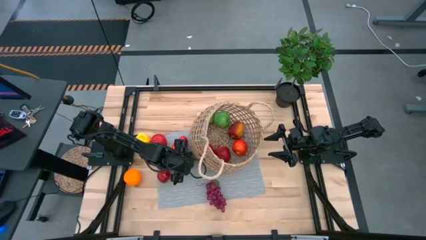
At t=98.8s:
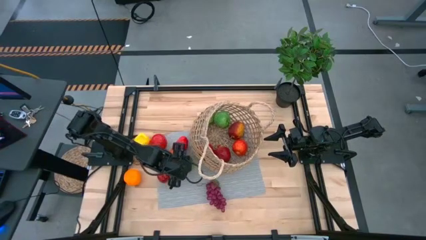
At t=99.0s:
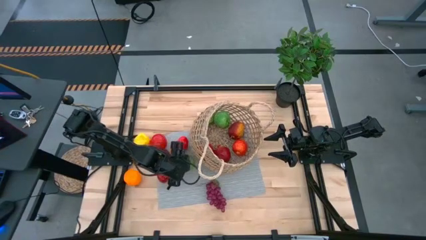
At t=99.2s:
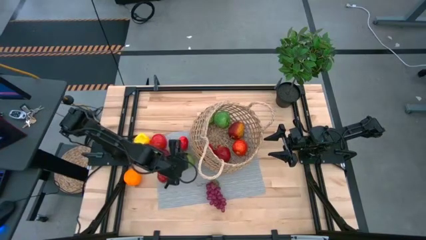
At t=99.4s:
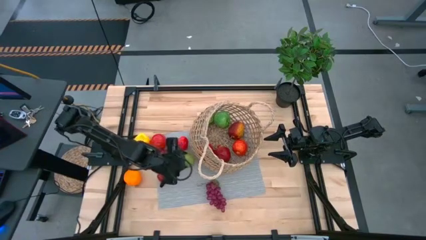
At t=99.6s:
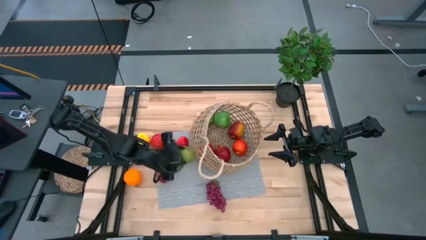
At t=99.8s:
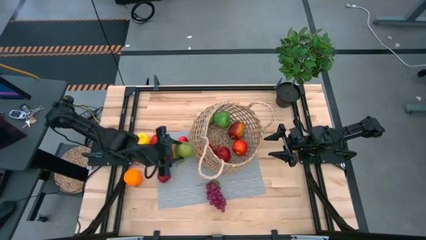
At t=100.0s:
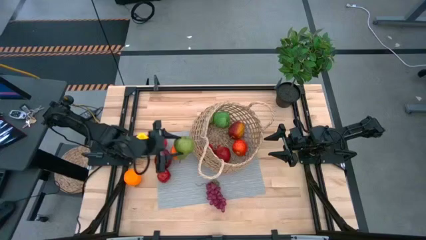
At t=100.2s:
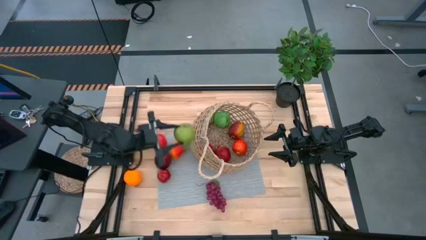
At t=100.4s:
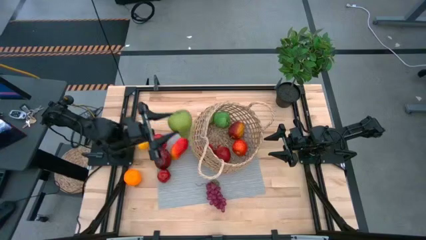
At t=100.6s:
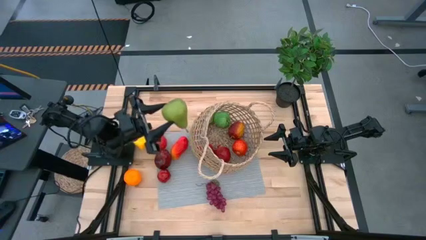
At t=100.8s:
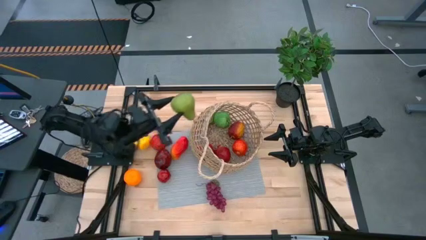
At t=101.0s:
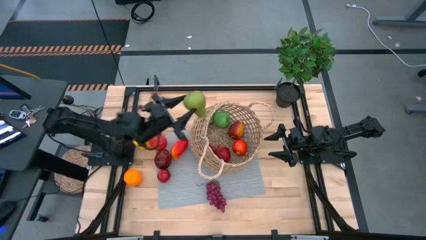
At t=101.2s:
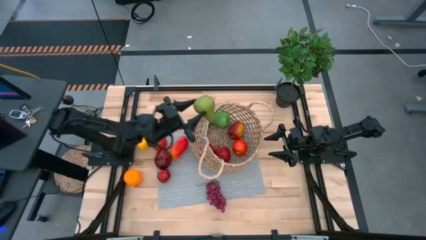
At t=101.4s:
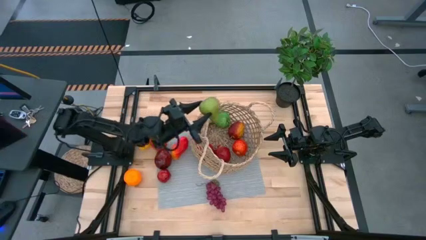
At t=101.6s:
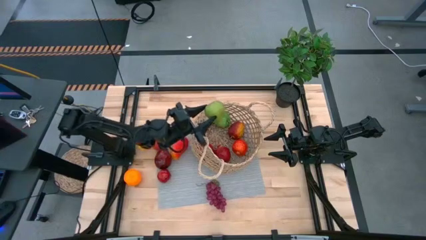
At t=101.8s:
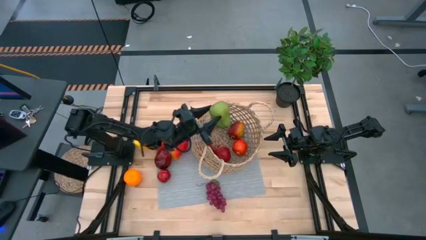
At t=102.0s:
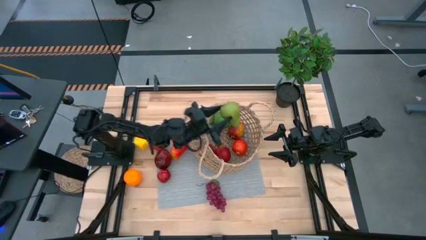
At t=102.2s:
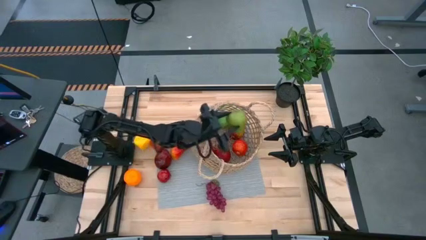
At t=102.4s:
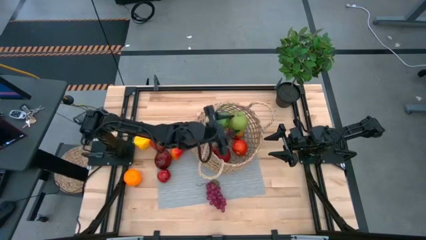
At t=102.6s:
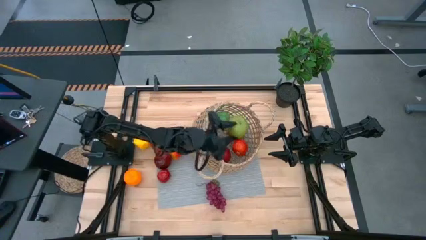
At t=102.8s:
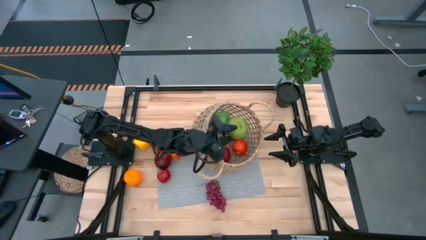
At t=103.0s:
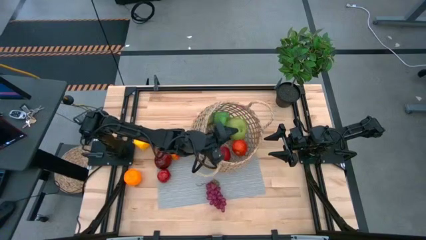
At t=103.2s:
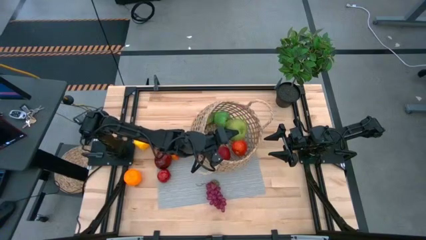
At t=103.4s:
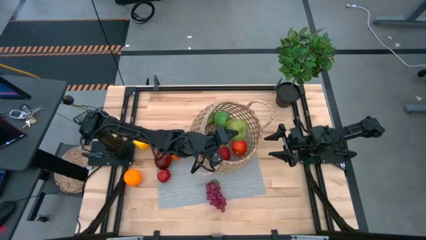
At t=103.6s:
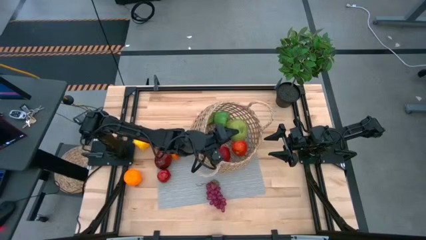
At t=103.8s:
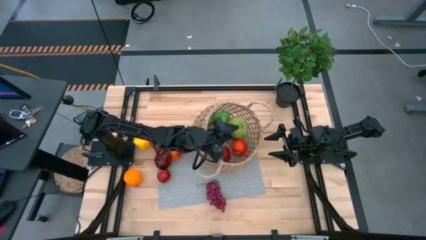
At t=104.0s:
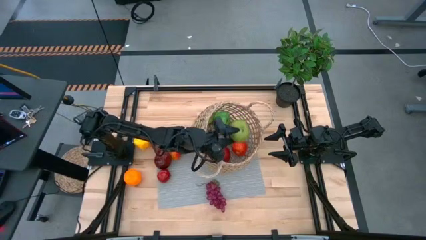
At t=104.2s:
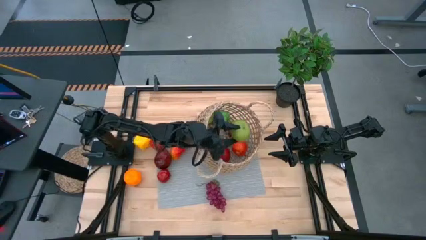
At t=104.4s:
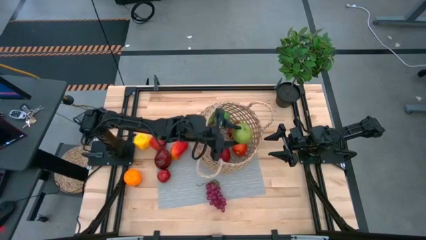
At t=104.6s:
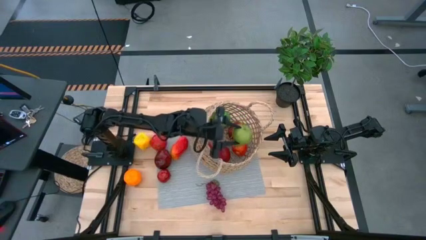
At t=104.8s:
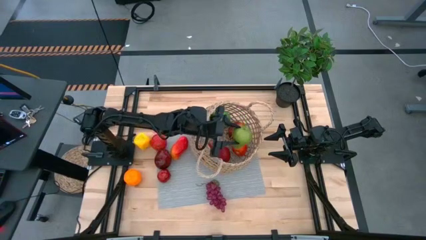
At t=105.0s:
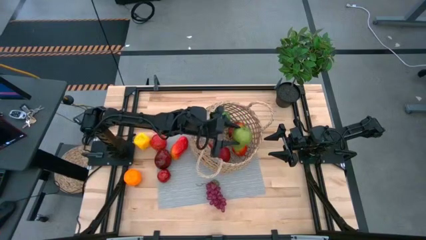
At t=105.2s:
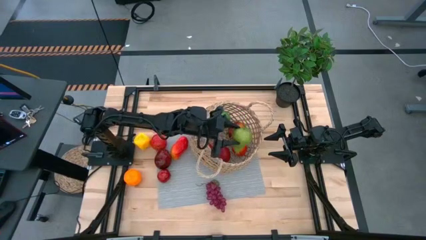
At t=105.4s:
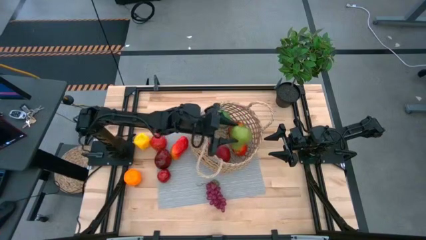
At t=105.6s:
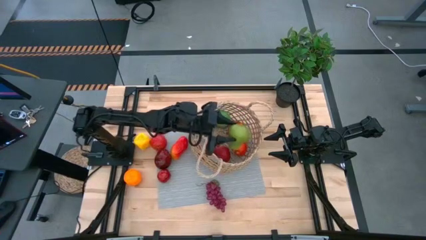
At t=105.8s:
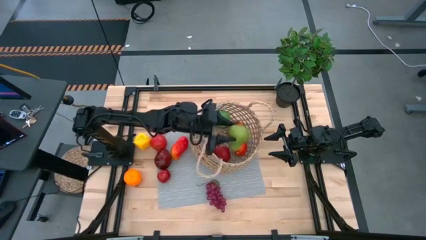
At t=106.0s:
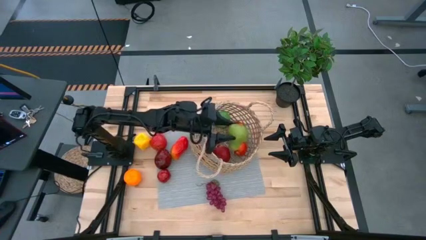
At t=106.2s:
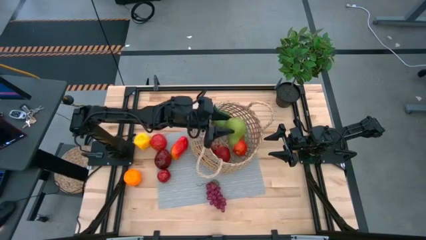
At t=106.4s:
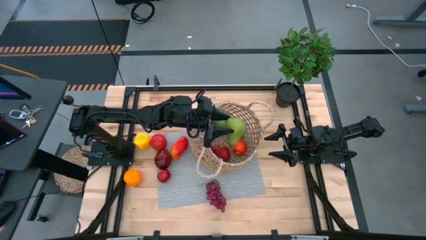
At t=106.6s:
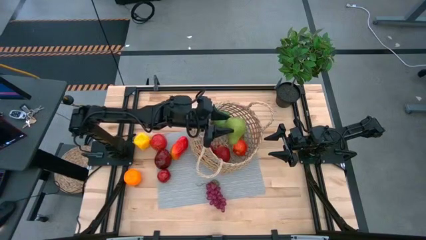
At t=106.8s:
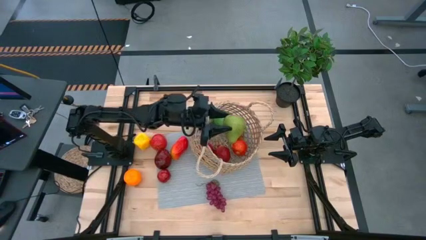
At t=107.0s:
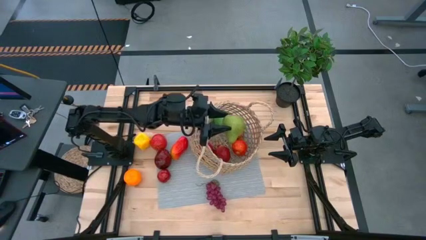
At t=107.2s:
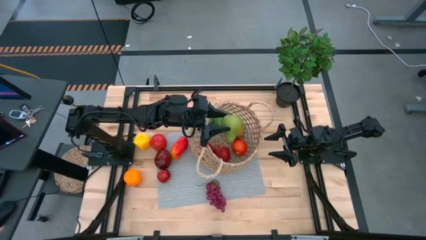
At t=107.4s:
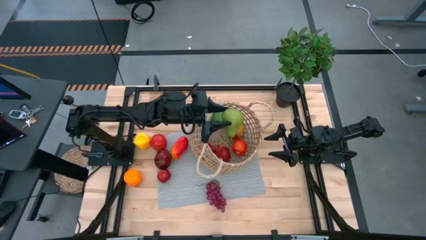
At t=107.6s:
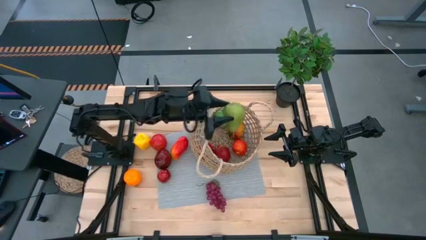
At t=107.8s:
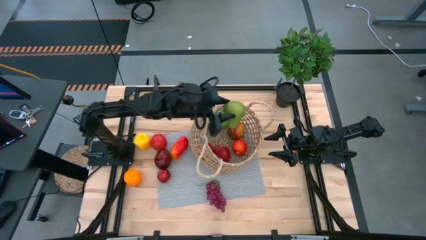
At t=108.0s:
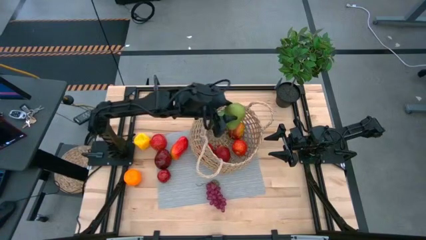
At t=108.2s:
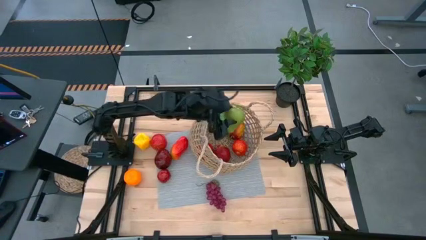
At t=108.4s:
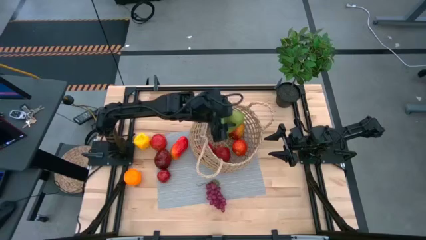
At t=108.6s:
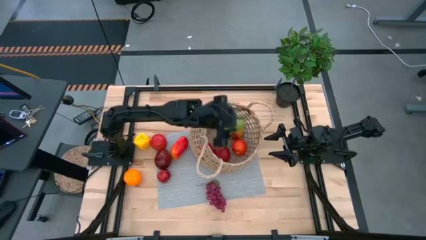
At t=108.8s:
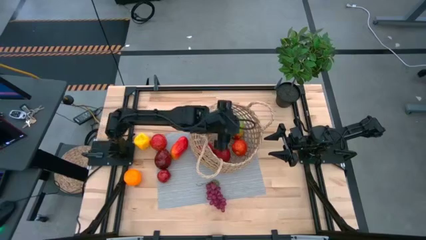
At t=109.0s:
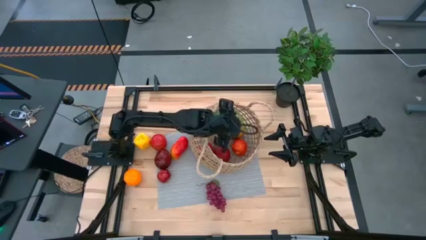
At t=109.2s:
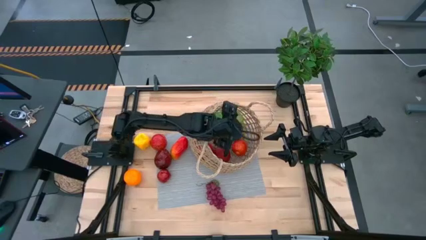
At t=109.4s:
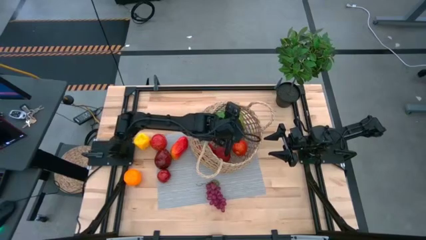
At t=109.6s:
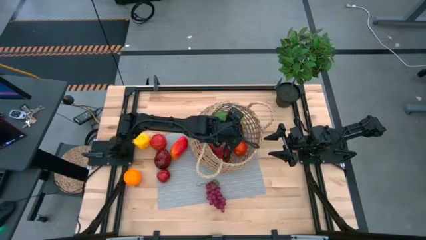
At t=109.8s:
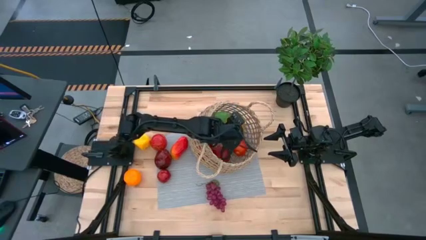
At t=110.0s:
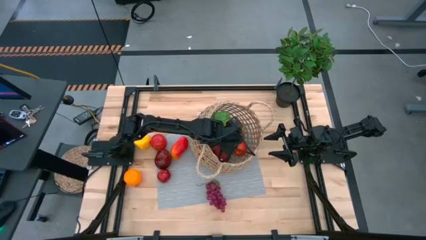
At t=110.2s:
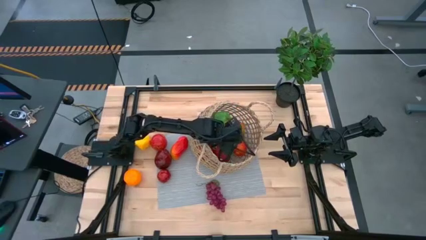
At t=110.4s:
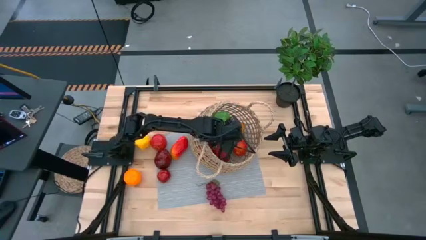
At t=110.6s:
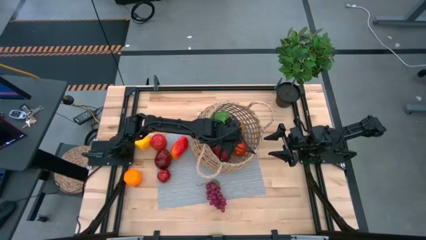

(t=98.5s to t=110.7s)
Task: Build produce basket
Put the pear into the brown basket

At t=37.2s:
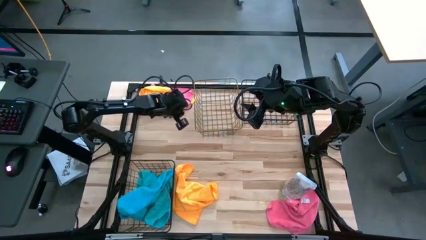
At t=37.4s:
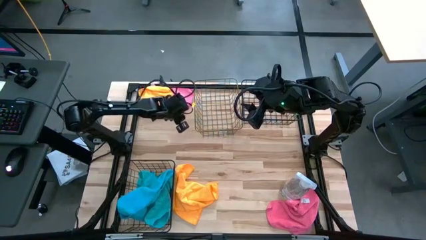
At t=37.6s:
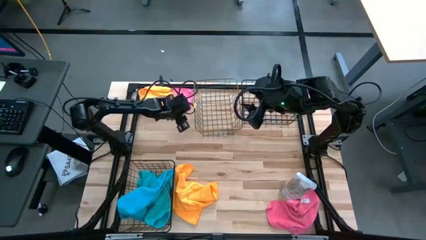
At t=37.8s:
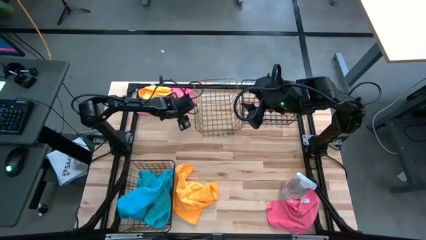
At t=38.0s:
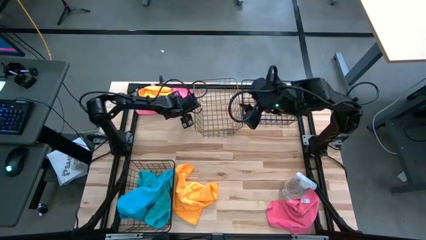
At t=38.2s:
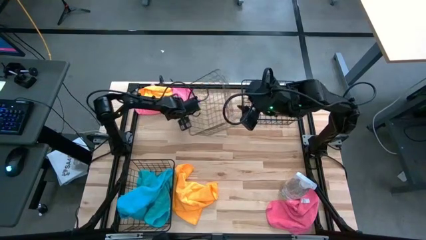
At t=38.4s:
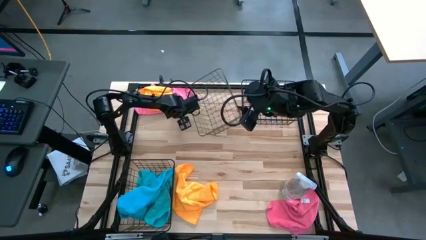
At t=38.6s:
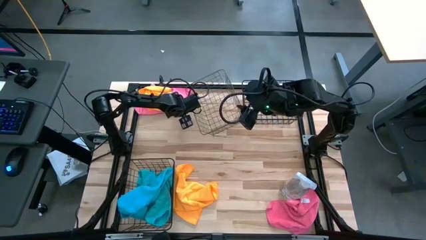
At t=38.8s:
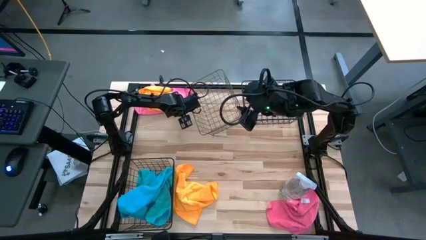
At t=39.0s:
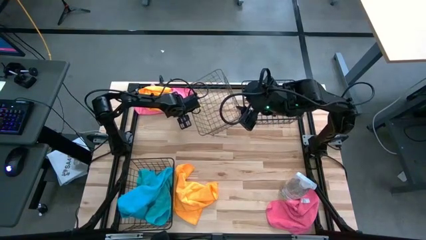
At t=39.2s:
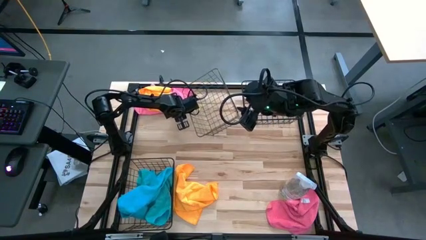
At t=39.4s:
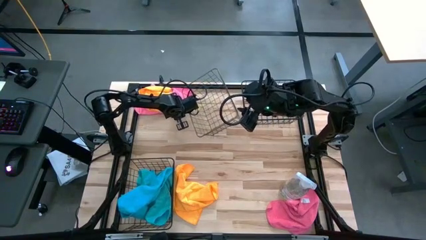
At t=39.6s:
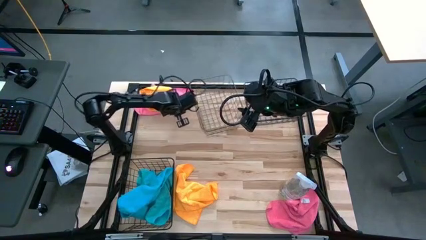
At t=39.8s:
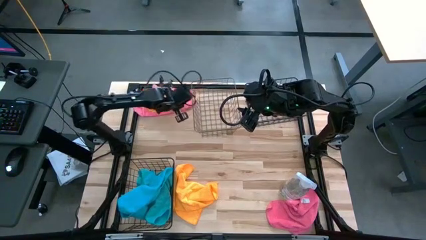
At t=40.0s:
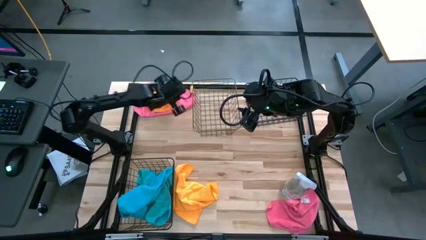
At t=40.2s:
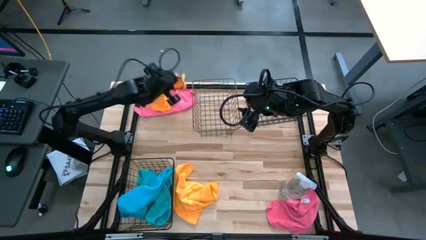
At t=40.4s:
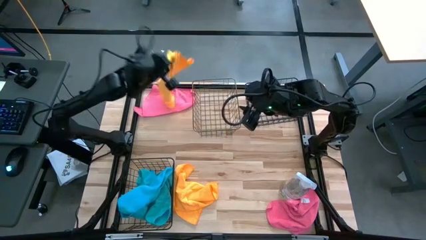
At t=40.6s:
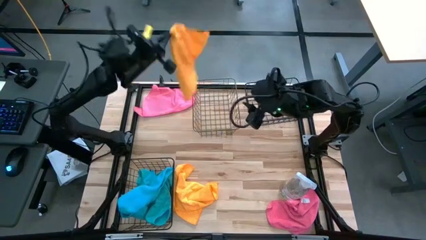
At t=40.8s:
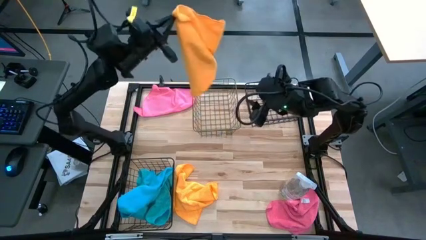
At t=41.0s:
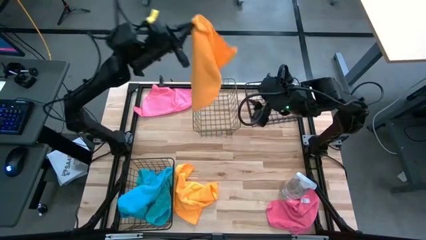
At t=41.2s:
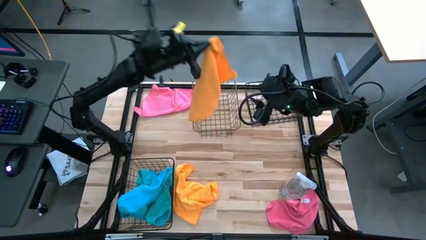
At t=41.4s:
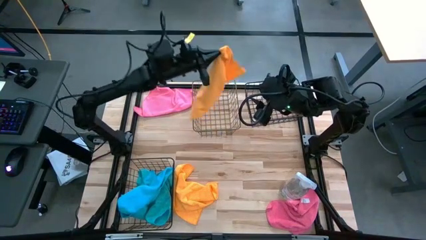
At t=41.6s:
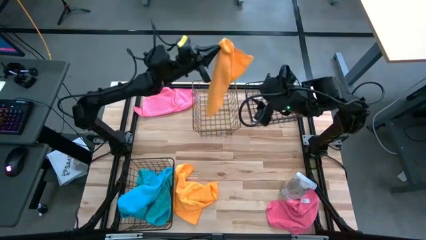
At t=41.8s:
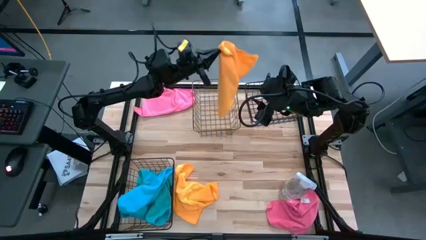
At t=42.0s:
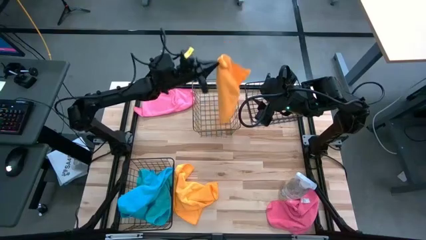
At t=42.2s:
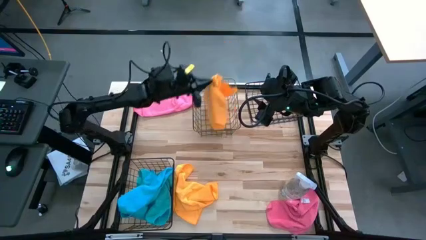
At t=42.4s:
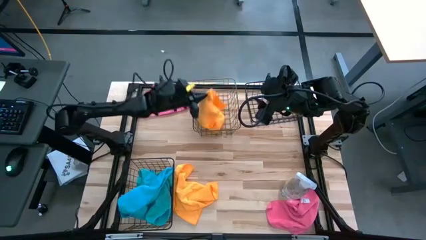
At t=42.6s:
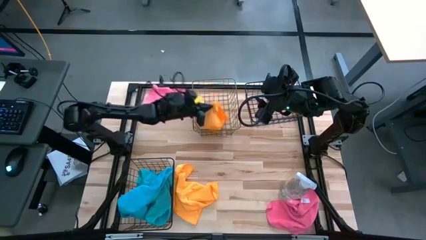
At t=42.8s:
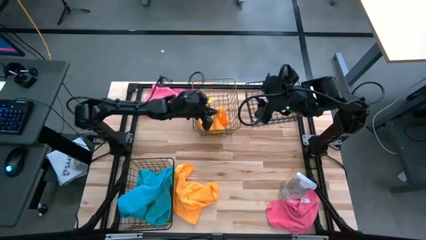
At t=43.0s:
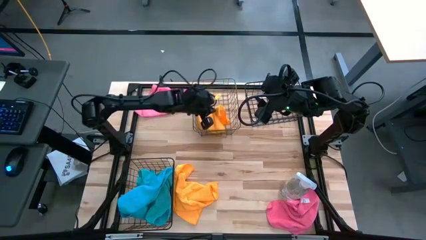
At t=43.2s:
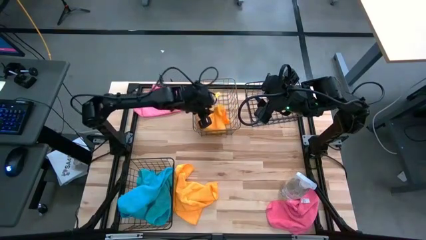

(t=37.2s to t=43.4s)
Task: Sort microfiber towel by color & place in baskets
Put the top yellow towel into the gold wire basket
